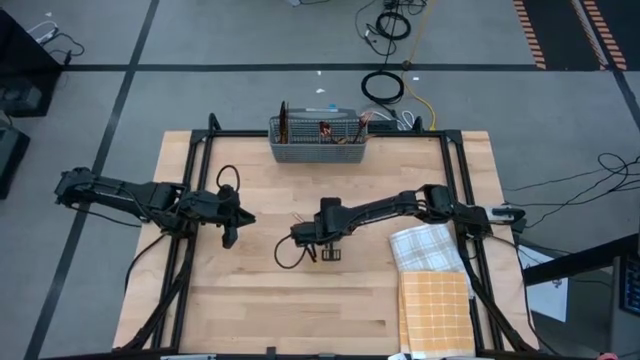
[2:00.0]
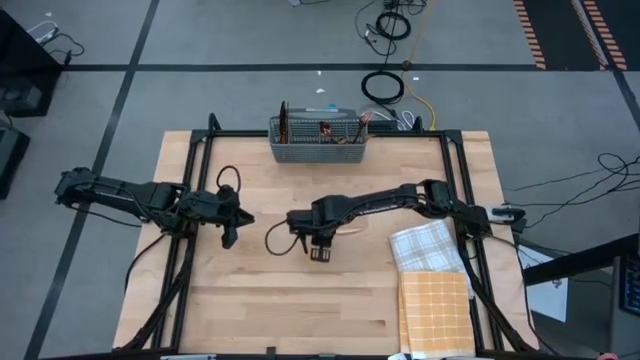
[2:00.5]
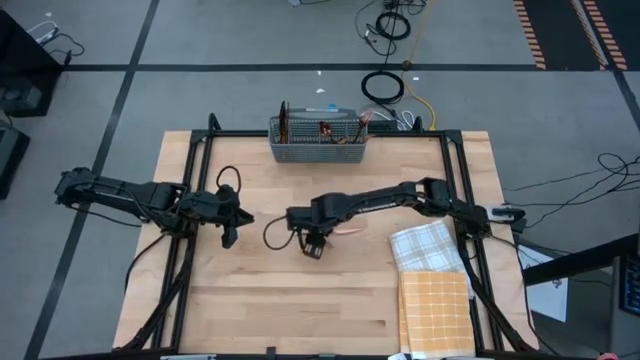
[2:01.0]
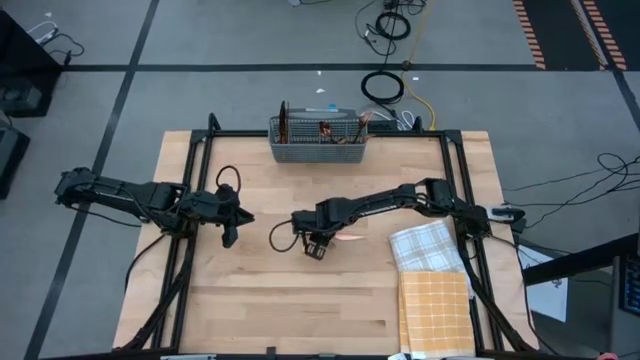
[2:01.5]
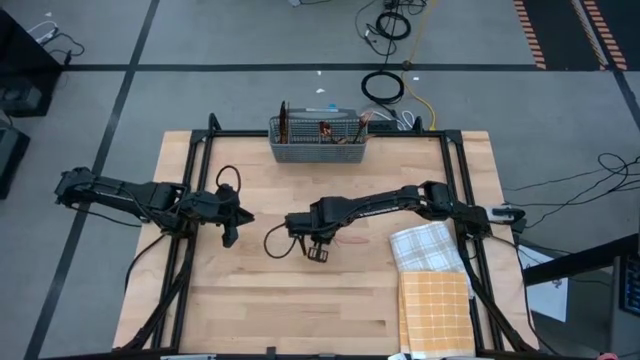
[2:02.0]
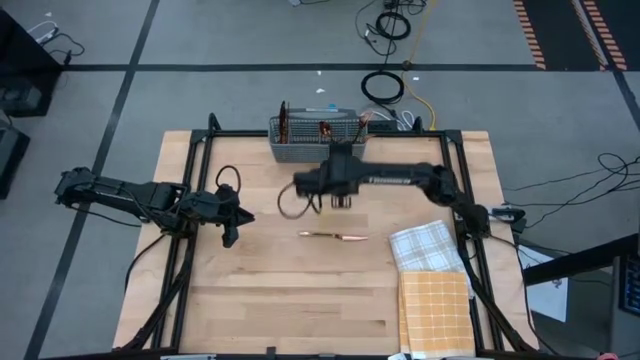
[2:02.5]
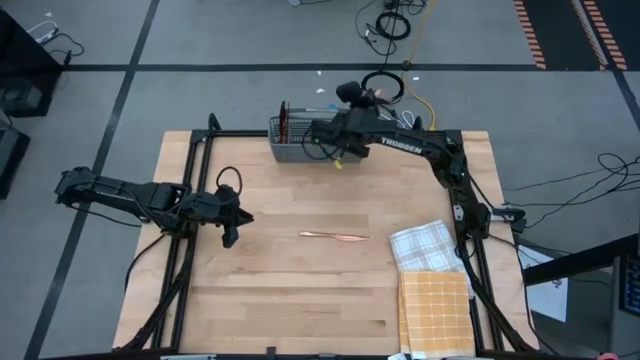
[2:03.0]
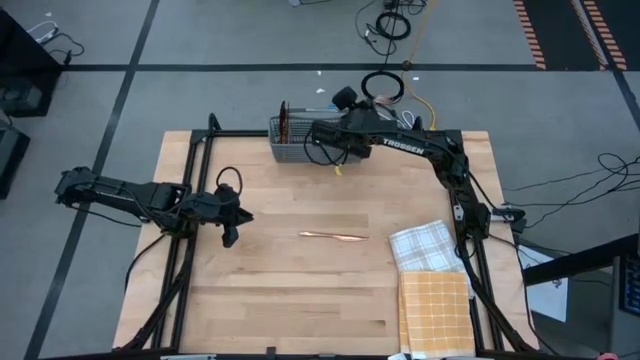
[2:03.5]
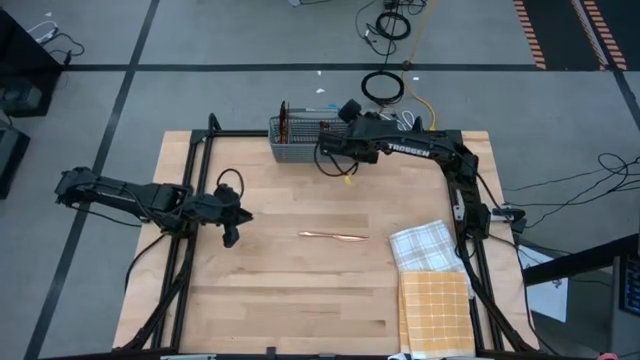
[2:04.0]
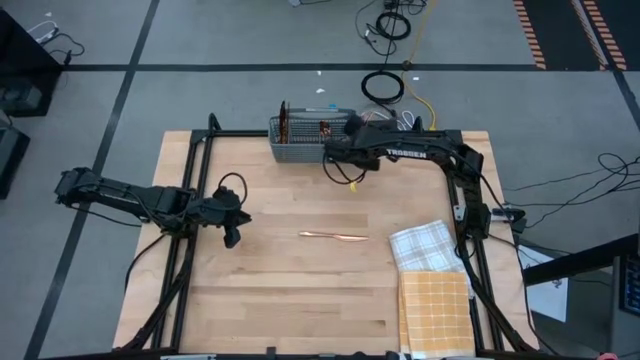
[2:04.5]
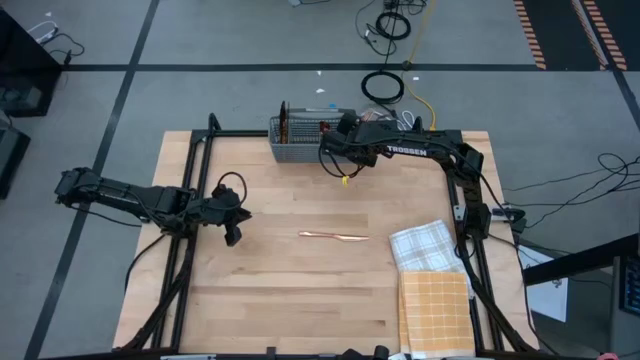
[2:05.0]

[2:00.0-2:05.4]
Task: Sort silverware
Put the bronze fork into the gray silverware rack

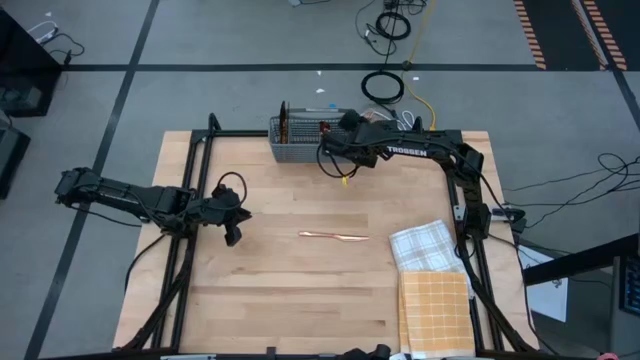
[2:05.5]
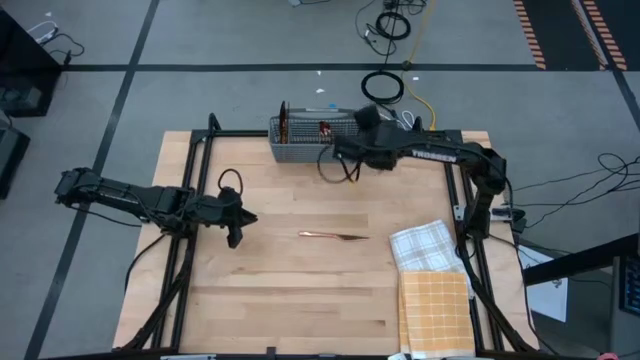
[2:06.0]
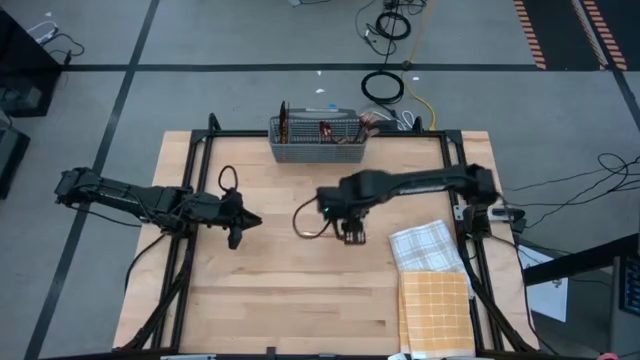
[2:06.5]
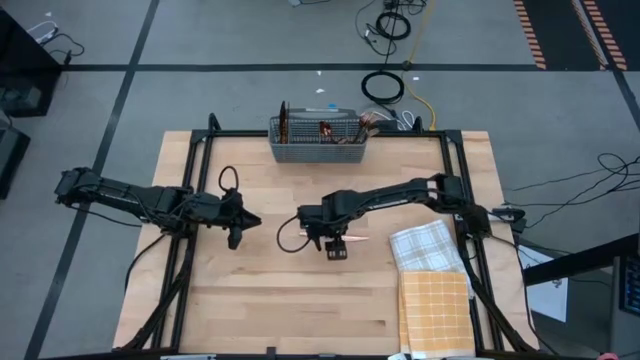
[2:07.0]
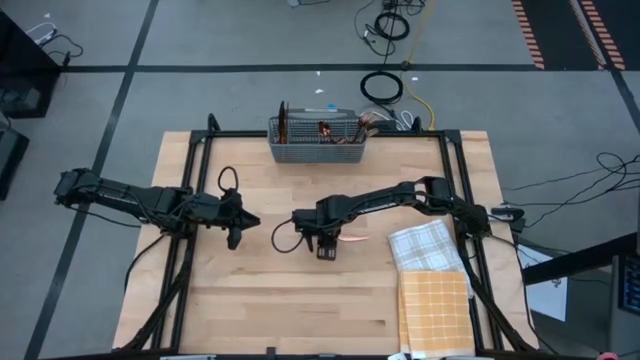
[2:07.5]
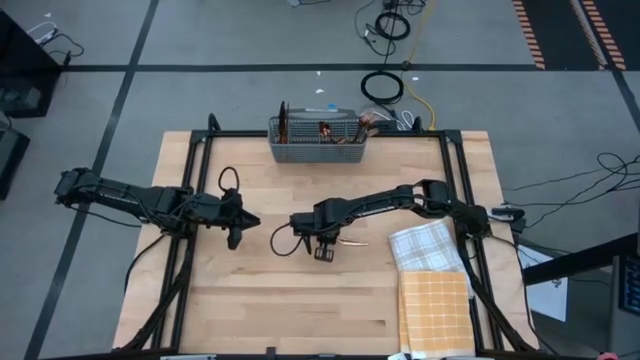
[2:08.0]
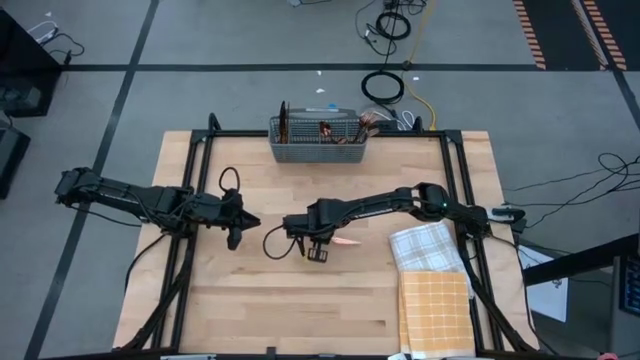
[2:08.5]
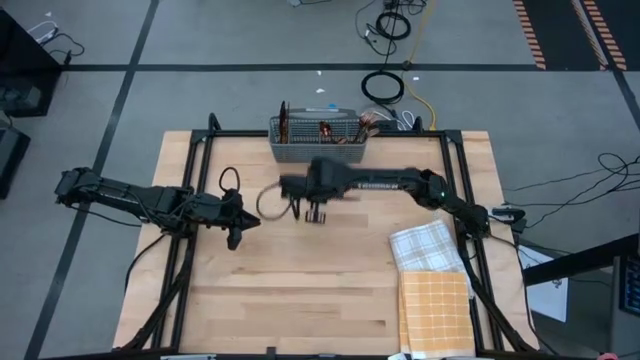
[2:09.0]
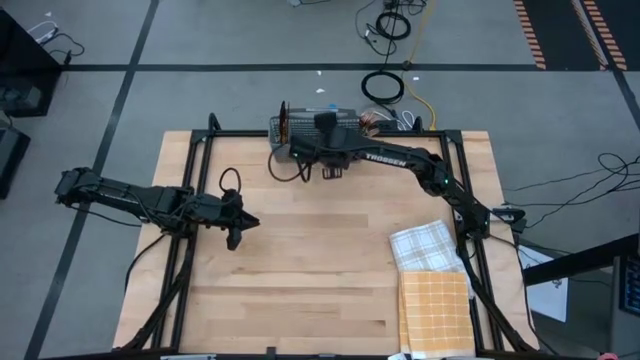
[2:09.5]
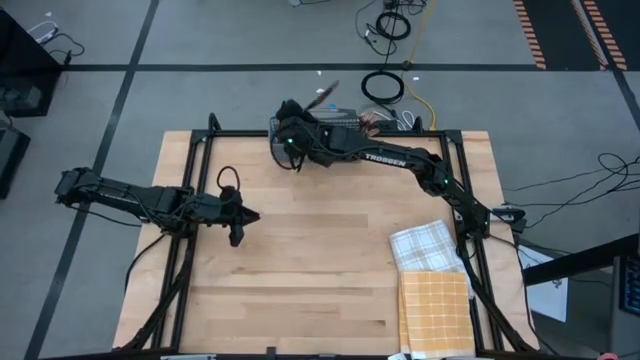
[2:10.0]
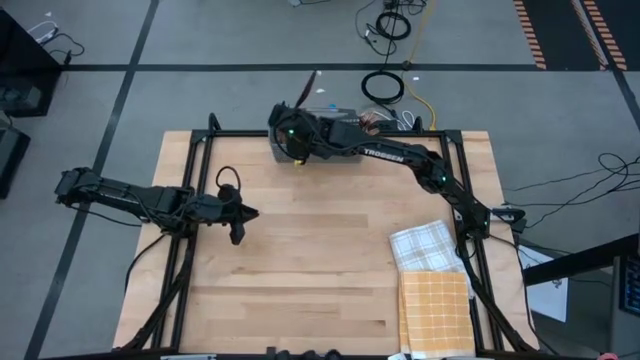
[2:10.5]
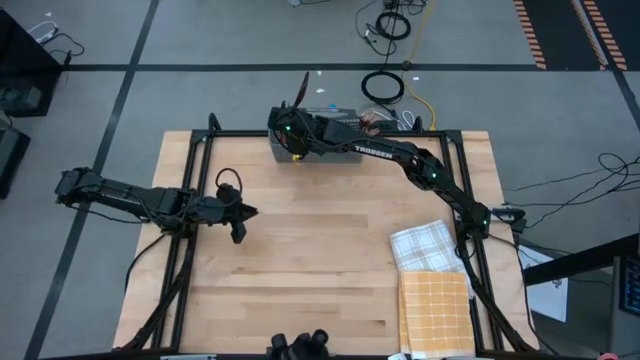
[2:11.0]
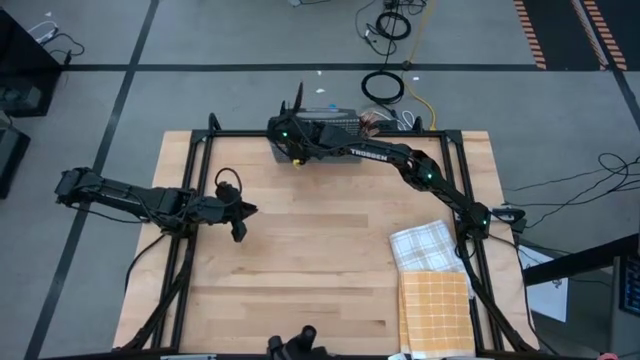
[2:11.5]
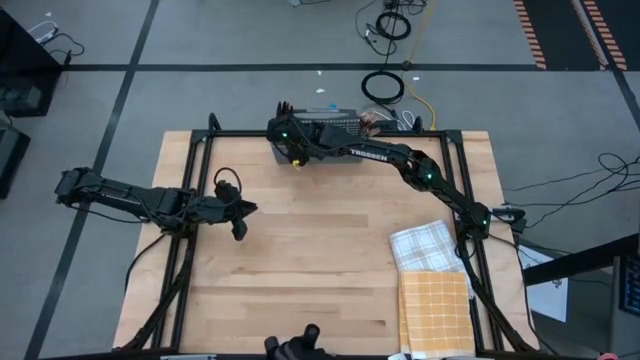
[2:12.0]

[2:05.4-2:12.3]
Put the bronze knife into the gray silverware rack

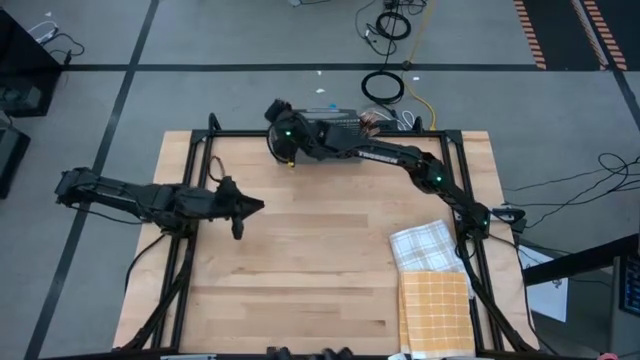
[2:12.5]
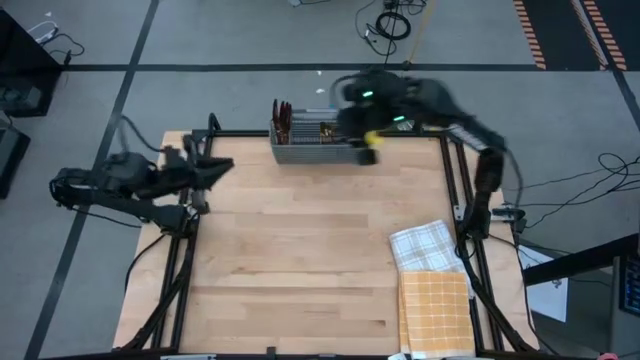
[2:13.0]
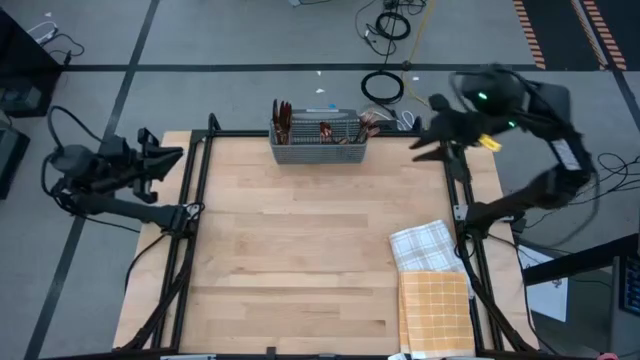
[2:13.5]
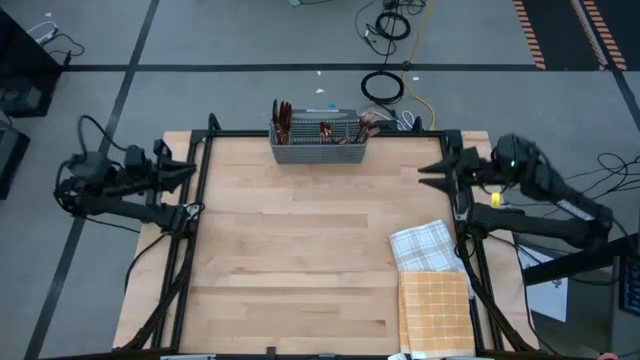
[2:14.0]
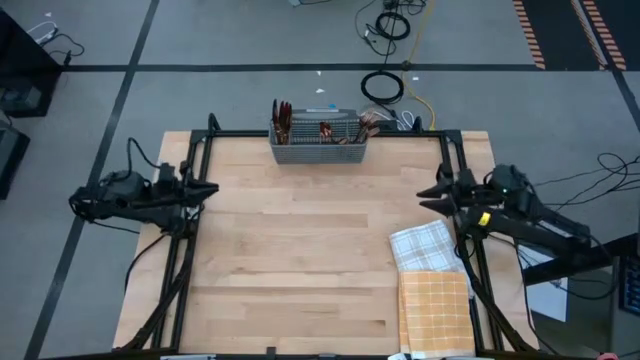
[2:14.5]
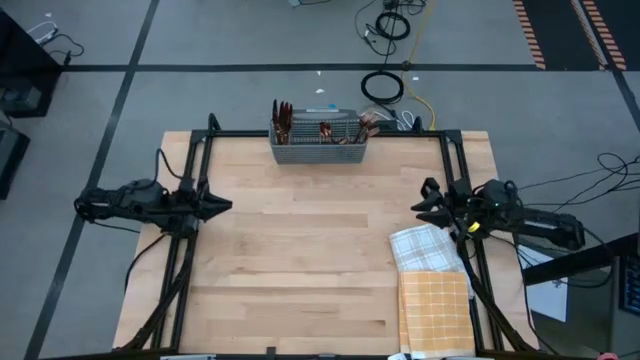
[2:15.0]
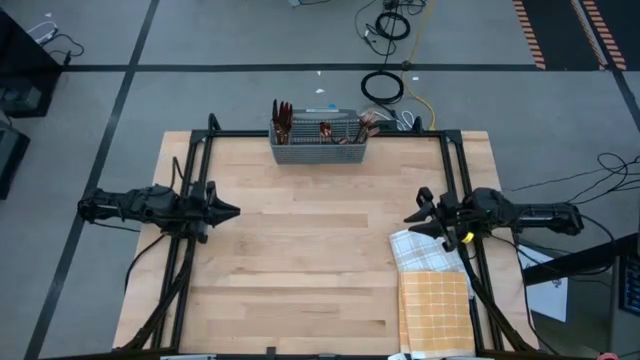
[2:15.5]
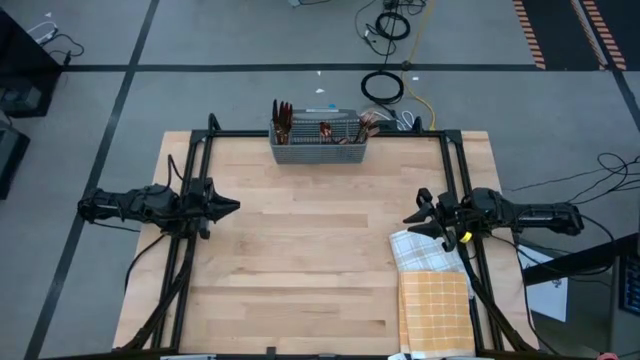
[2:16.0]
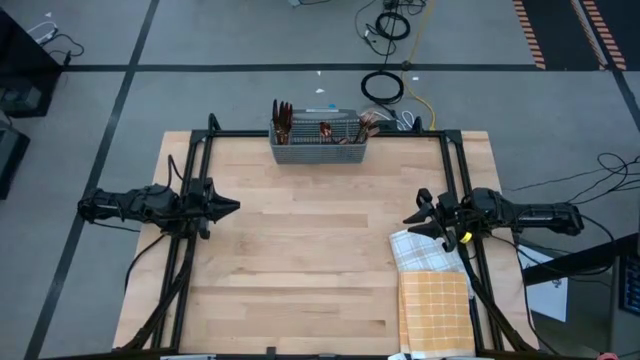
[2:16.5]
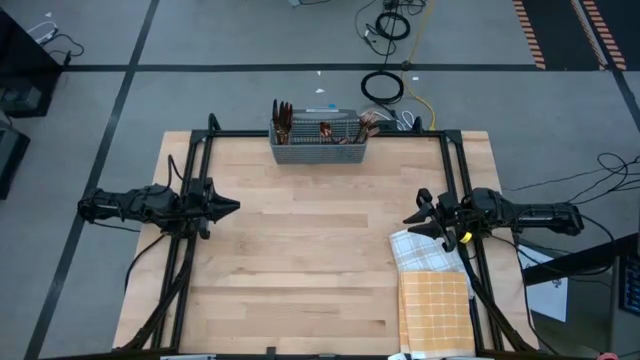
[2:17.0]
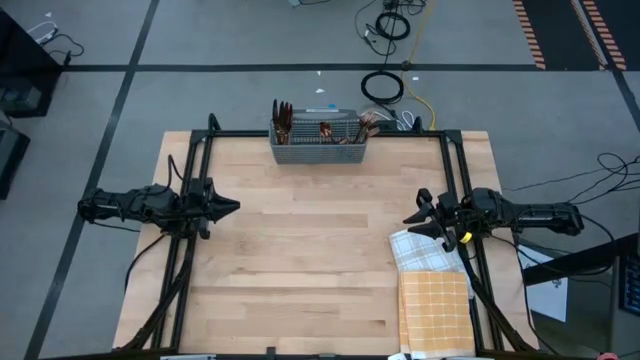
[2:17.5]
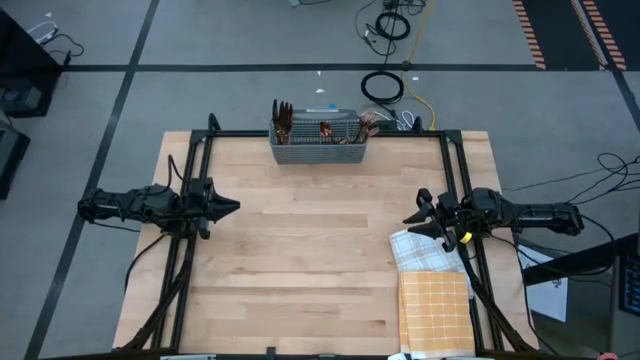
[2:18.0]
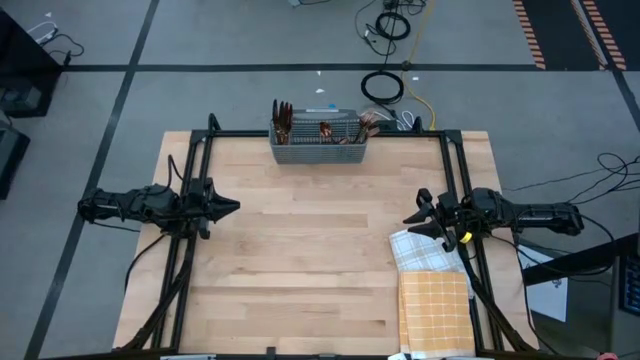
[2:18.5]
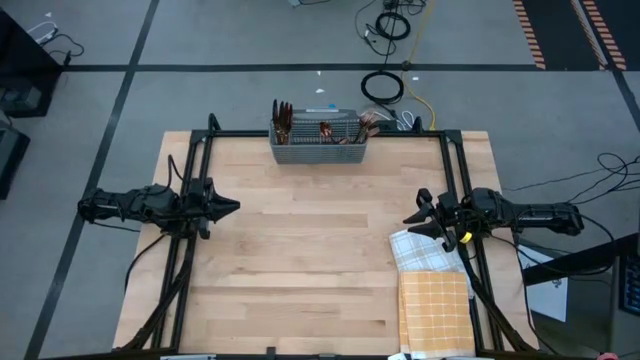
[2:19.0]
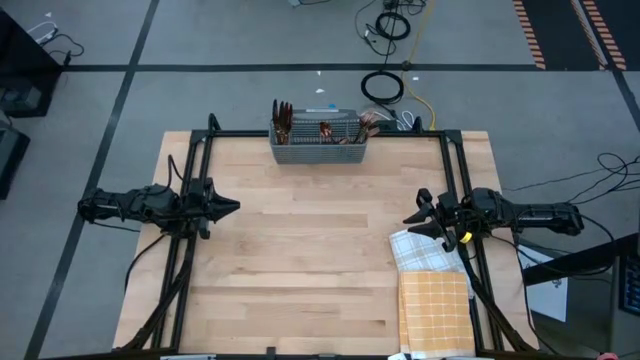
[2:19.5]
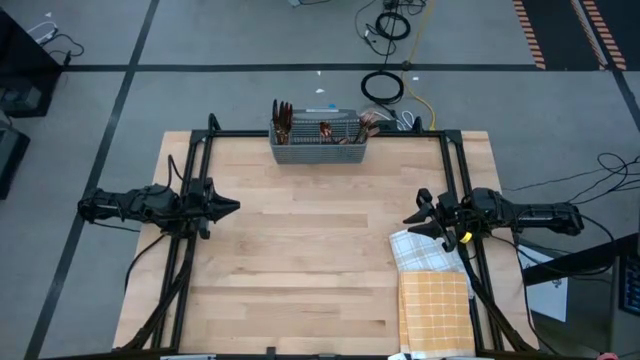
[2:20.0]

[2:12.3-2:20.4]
Return to home position
